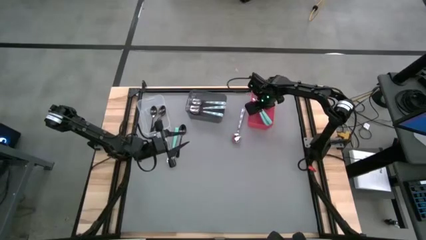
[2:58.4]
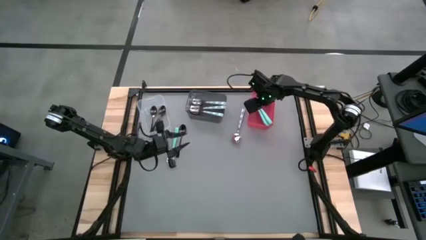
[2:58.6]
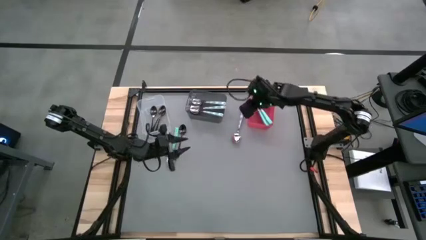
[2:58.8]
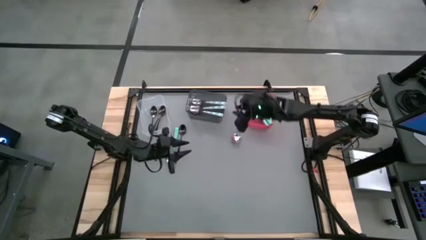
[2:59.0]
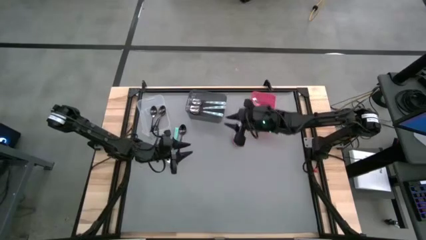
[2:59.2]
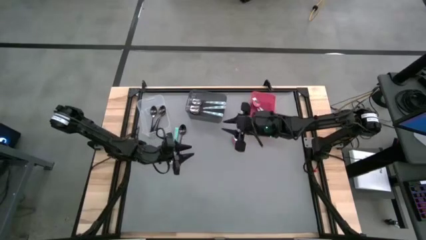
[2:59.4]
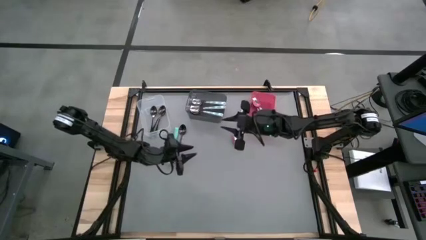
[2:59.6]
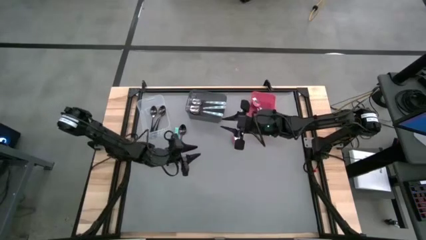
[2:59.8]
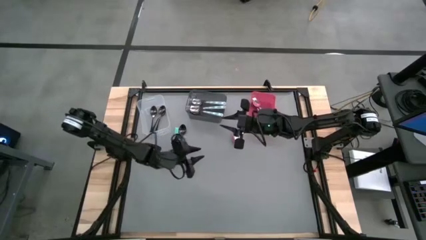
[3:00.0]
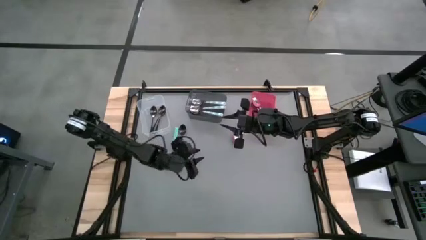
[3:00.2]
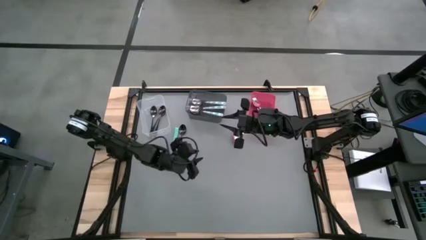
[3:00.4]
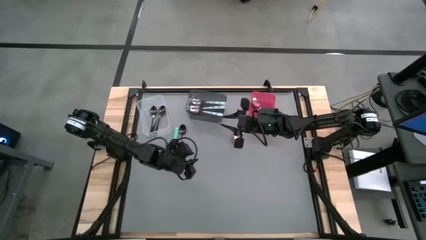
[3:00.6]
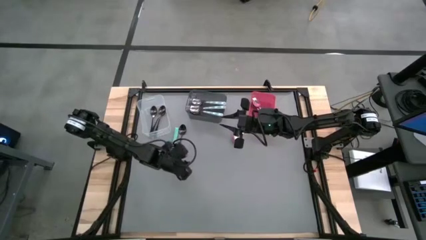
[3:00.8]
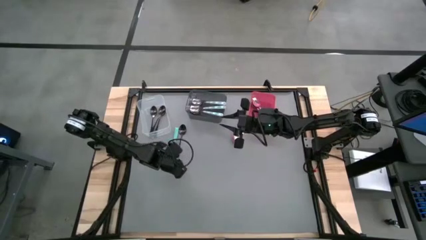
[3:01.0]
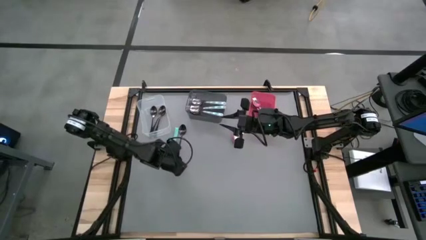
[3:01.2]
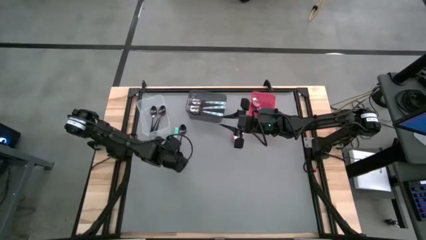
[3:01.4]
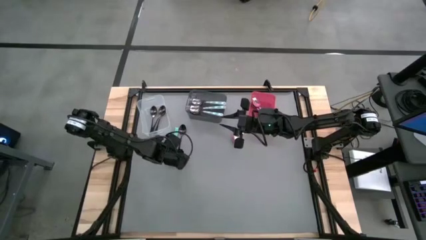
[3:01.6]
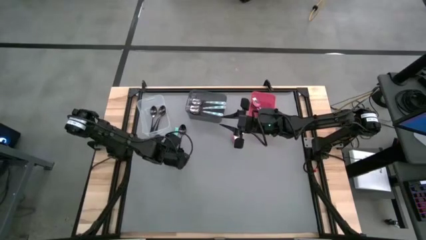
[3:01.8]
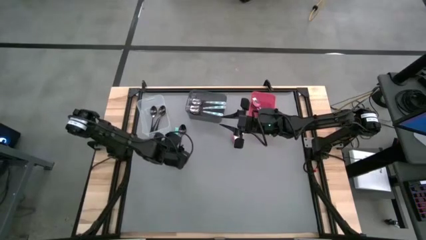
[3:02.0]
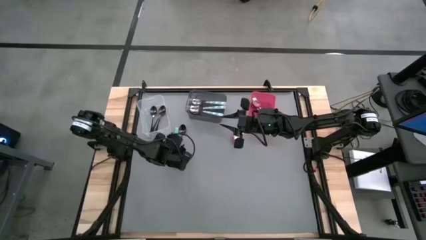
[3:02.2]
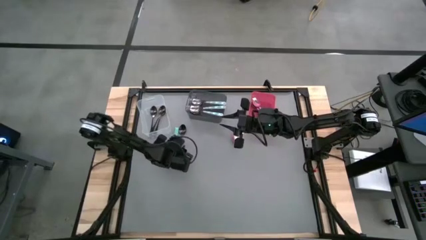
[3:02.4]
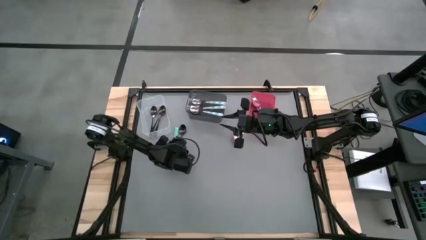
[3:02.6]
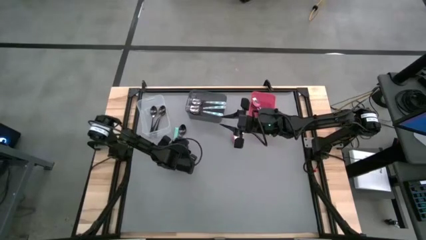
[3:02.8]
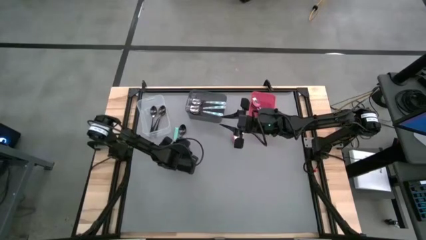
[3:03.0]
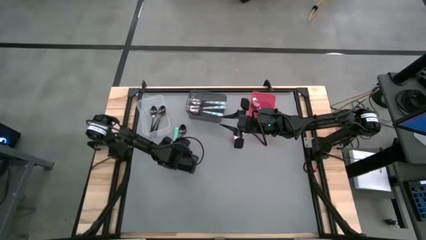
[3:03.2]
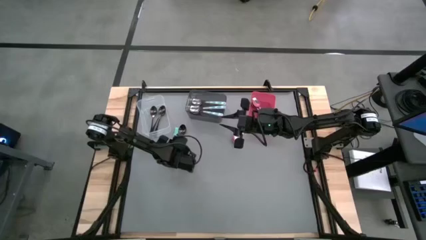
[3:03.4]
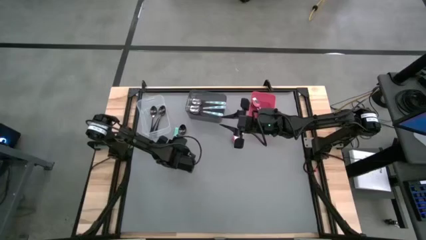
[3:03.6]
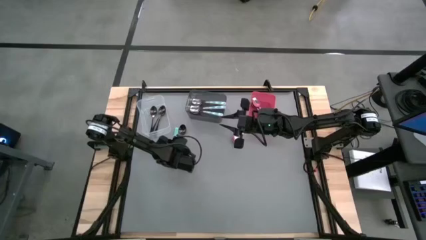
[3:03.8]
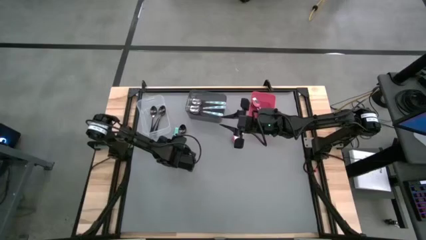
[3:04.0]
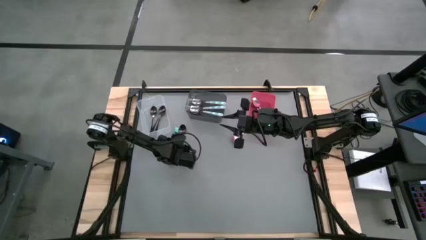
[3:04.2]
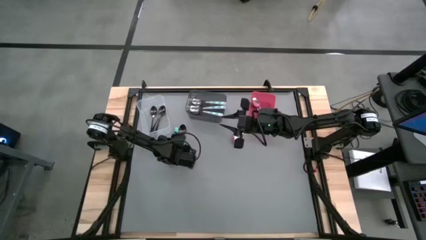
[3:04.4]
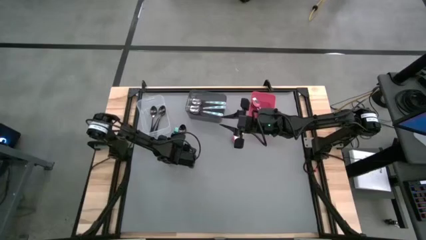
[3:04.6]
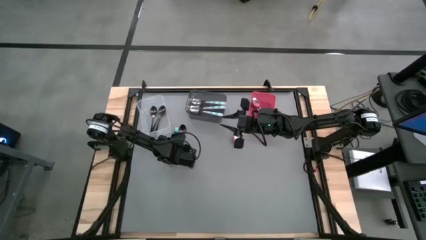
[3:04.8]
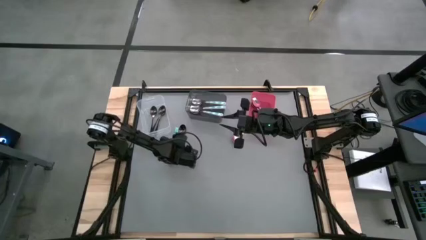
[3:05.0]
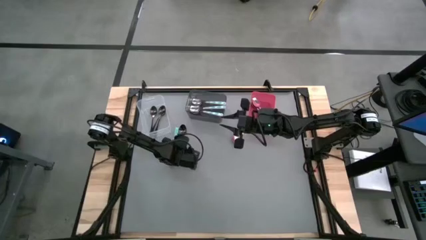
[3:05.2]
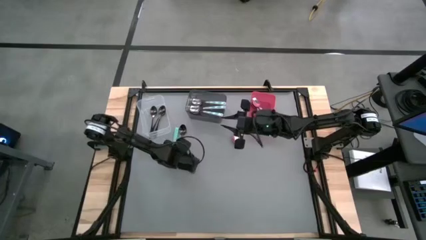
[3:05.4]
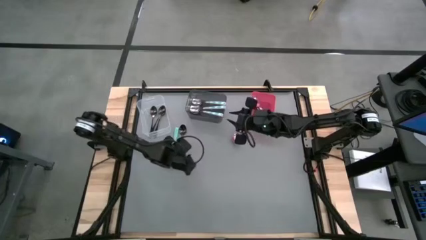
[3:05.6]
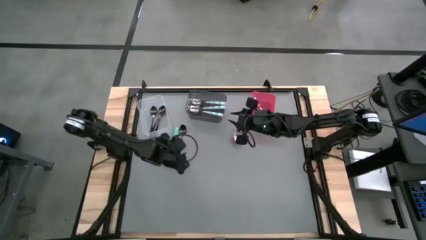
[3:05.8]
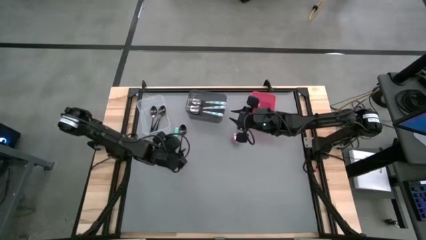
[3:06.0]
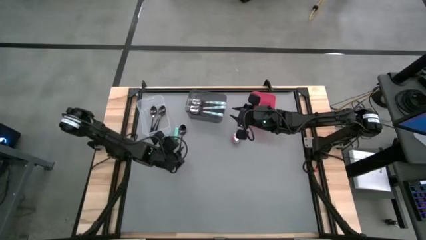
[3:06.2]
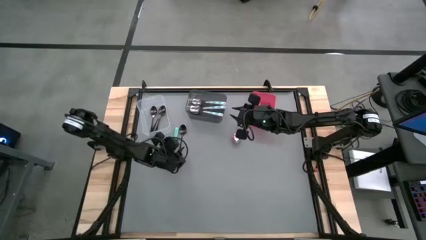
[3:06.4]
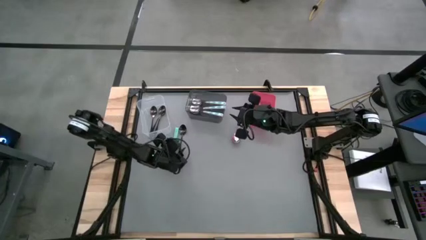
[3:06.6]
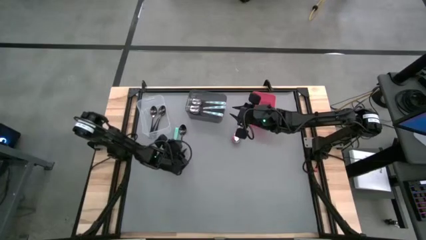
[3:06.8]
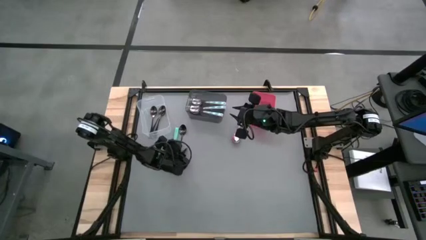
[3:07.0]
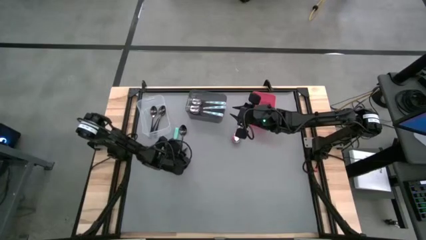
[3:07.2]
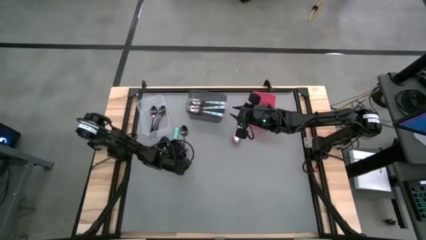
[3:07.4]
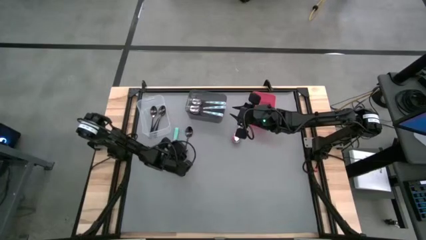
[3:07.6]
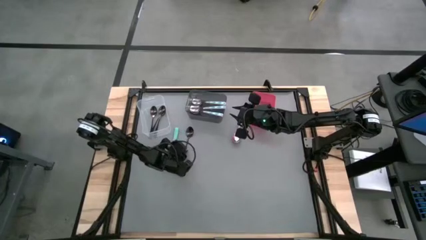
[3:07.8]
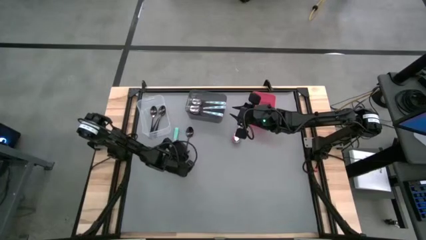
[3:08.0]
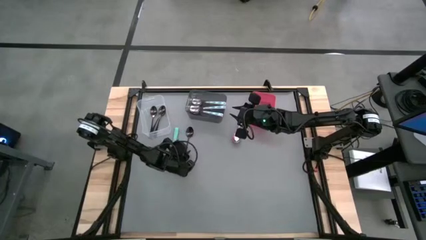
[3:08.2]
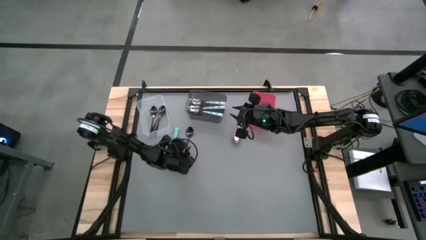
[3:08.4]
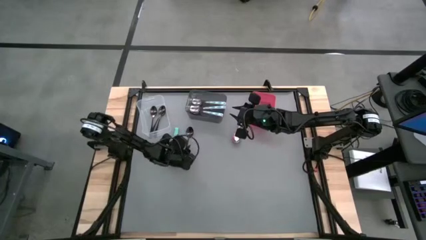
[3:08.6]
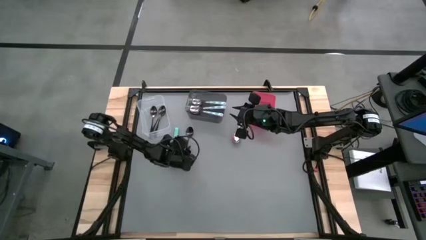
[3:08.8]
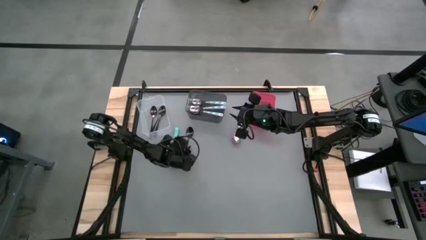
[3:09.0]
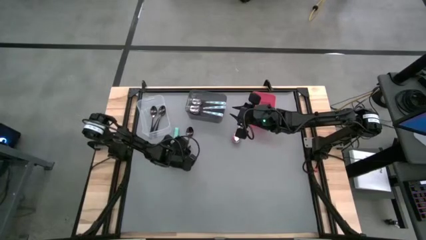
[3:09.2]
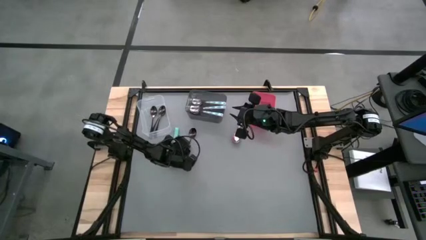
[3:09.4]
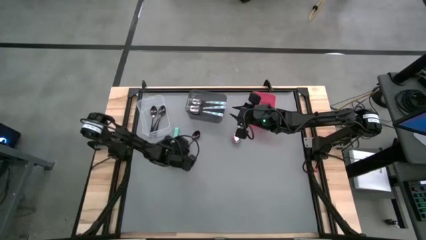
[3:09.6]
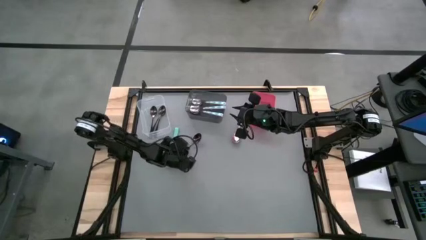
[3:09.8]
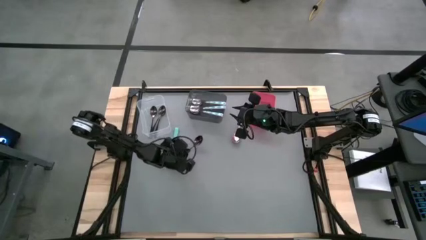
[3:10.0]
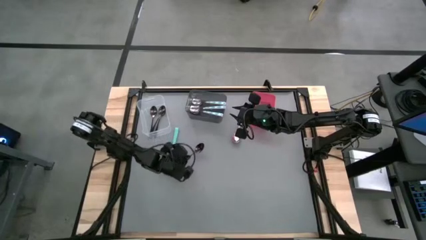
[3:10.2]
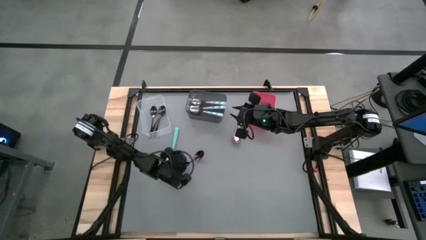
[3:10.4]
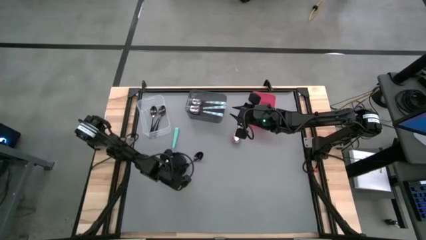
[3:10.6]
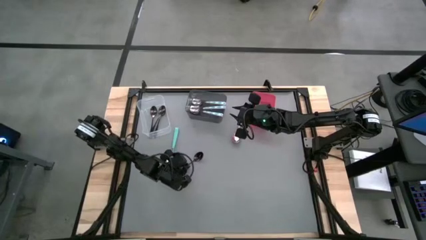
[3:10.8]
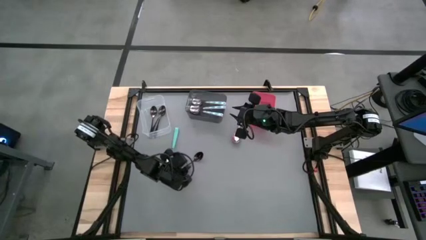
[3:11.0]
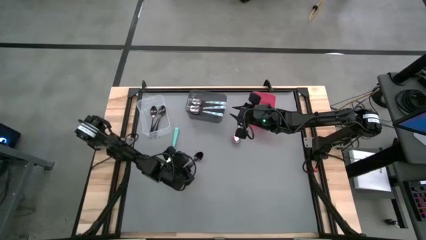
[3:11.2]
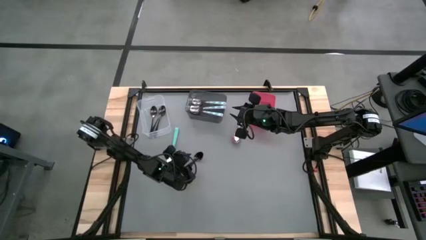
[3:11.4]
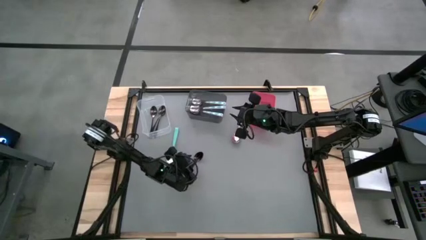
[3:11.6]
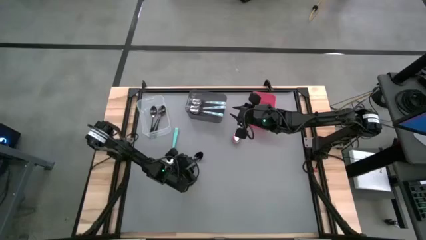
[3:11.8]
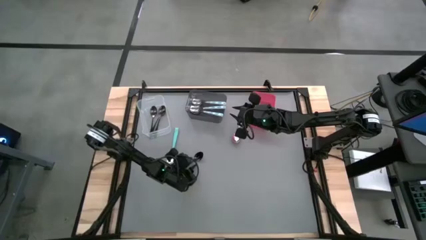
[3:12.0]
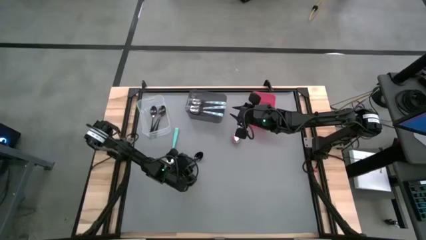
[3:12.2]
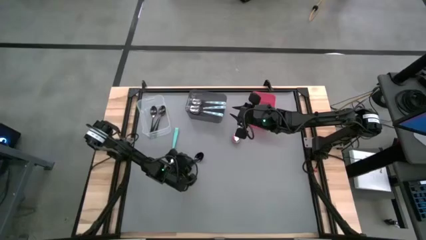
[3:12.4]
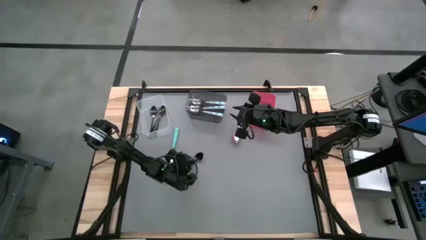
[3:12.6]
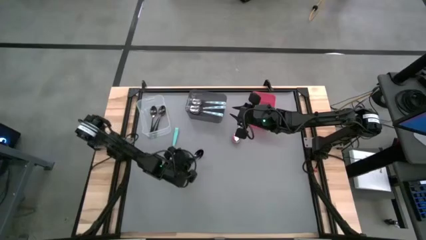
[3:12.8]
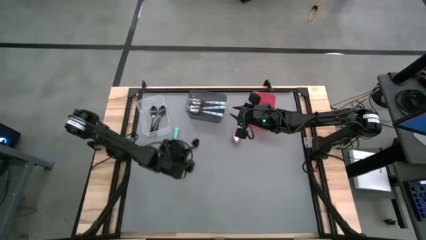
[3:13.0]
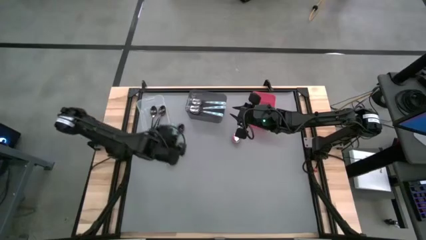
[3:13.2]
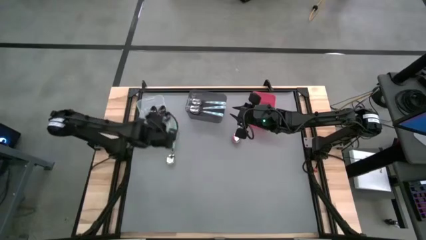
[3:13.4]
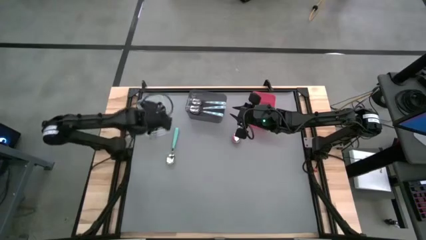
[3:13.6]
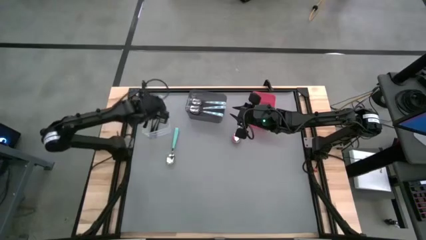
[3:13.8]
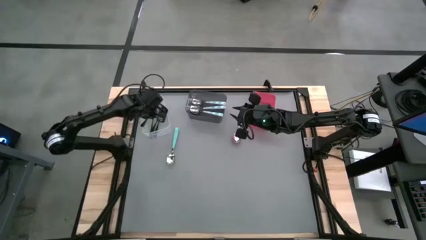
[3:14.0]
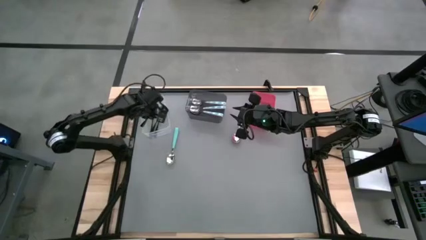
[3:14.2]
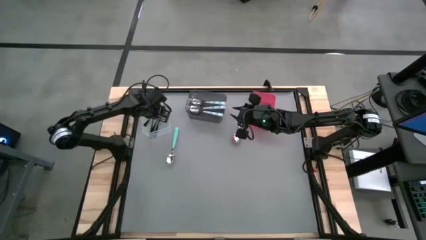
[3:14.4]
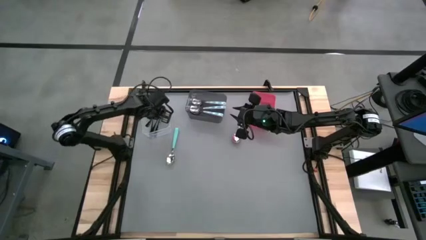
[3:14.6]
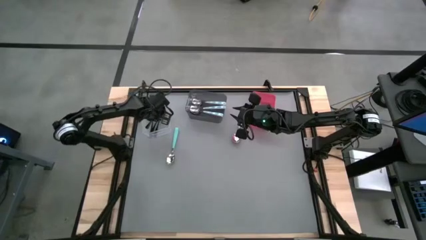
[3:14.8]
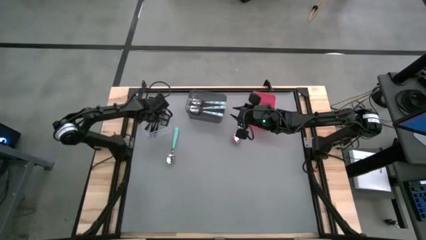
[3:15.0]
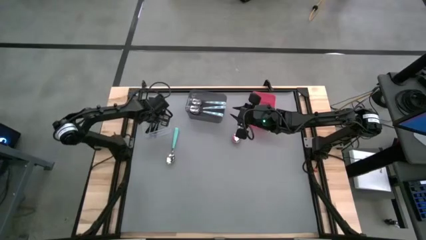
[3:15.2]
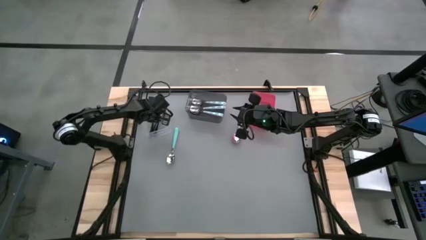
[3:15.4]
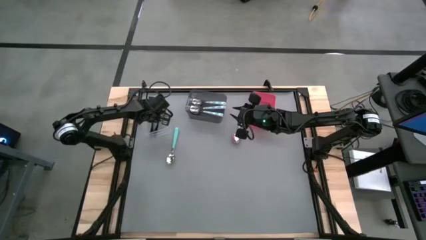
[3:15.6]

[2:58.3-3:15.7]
Task: Sort silverware by color (type)
Put the black spoon into the transparent bin
